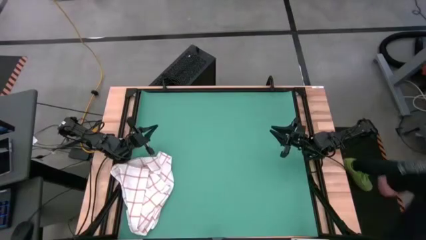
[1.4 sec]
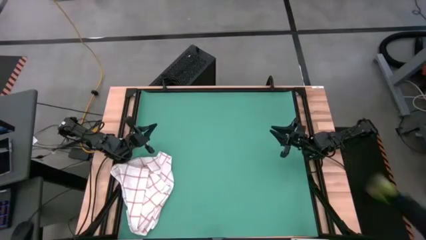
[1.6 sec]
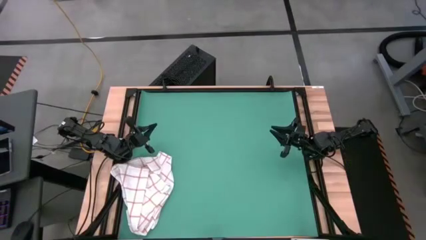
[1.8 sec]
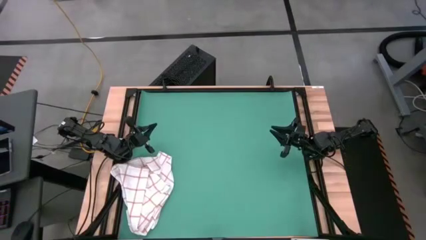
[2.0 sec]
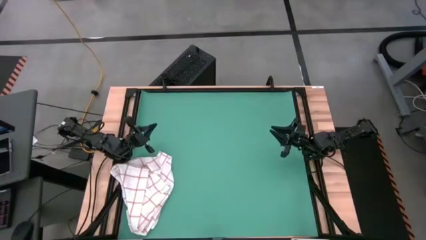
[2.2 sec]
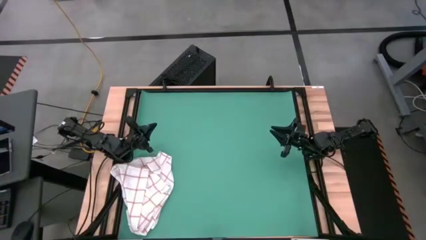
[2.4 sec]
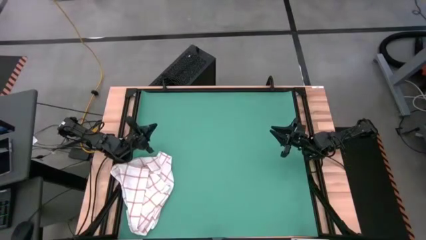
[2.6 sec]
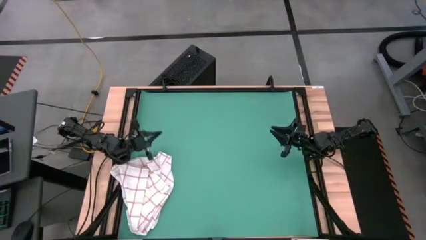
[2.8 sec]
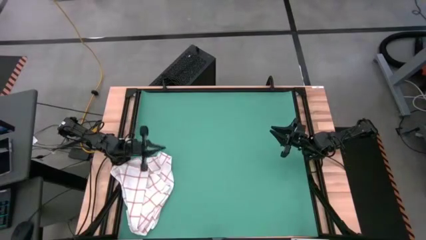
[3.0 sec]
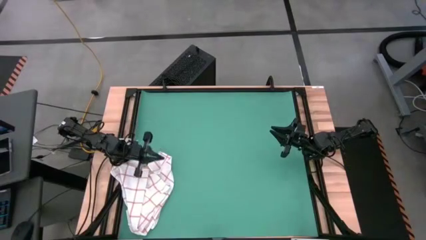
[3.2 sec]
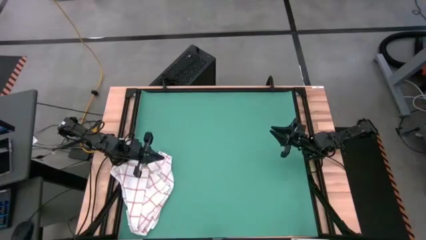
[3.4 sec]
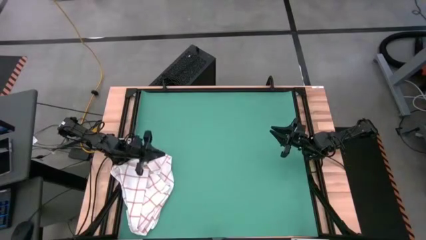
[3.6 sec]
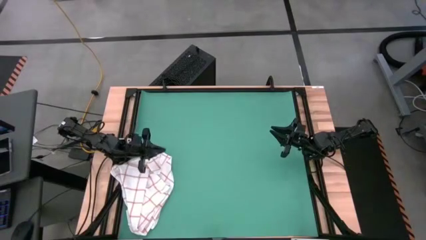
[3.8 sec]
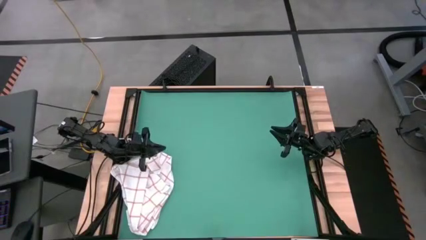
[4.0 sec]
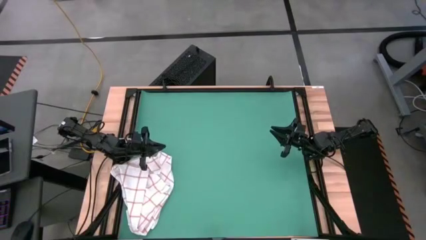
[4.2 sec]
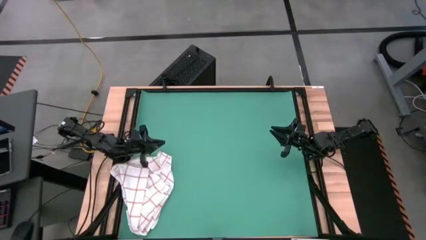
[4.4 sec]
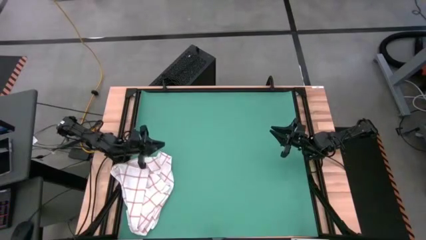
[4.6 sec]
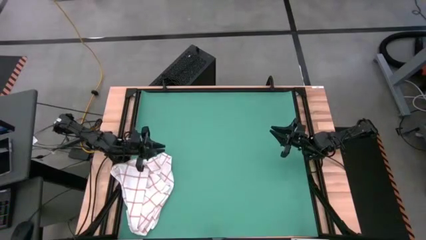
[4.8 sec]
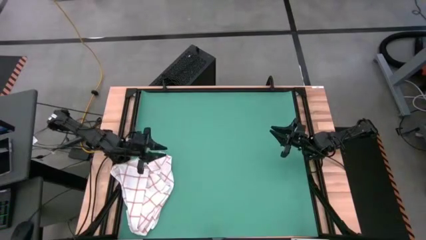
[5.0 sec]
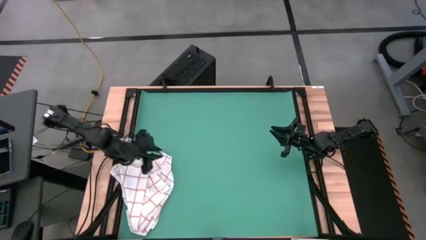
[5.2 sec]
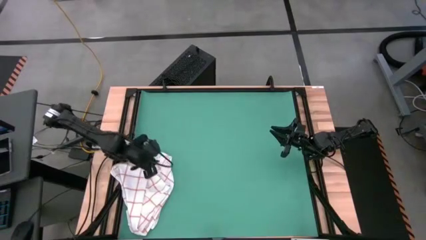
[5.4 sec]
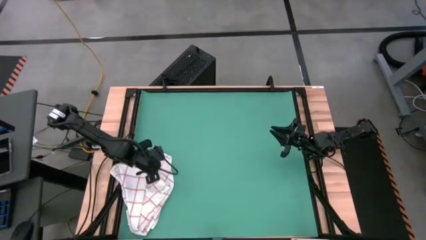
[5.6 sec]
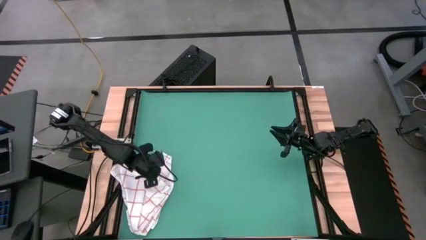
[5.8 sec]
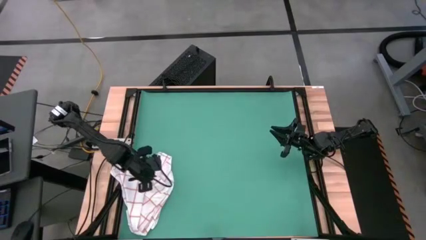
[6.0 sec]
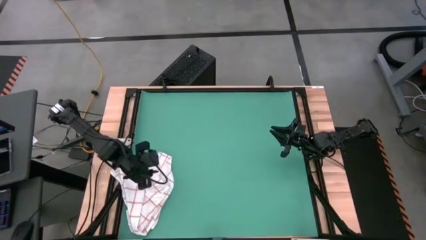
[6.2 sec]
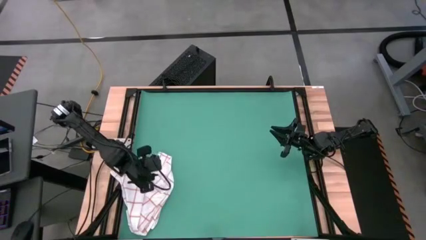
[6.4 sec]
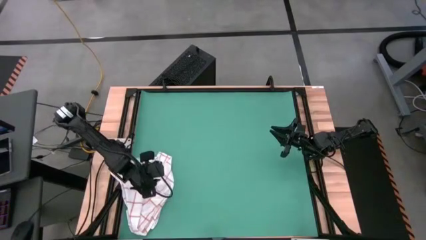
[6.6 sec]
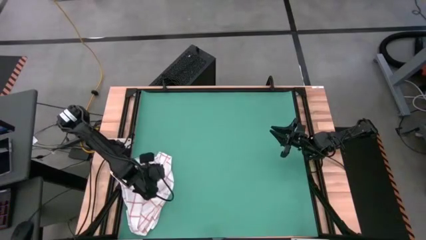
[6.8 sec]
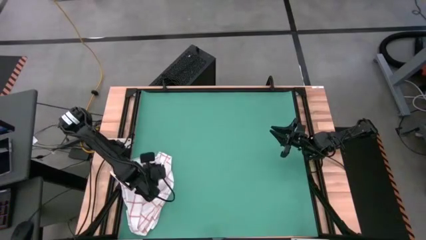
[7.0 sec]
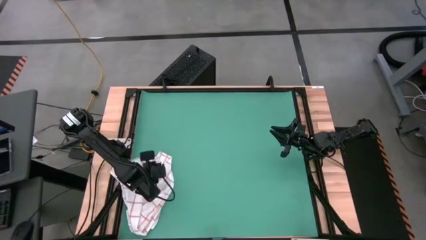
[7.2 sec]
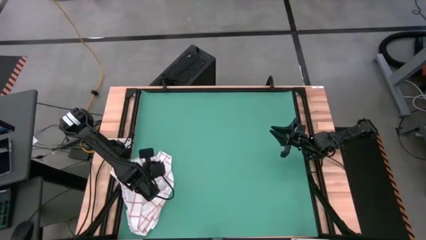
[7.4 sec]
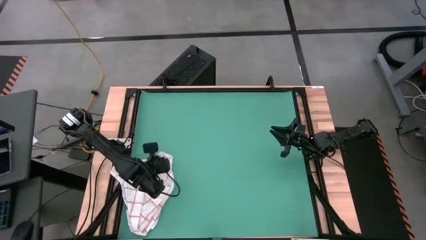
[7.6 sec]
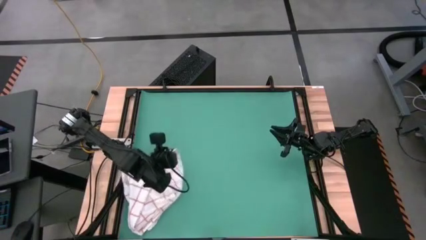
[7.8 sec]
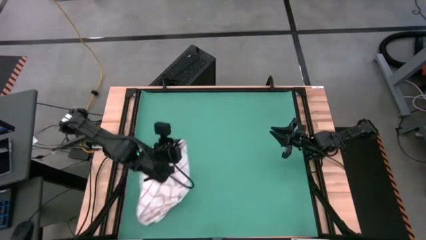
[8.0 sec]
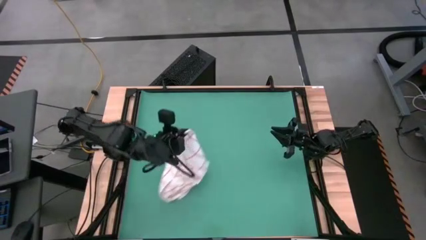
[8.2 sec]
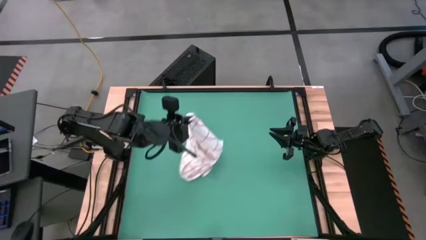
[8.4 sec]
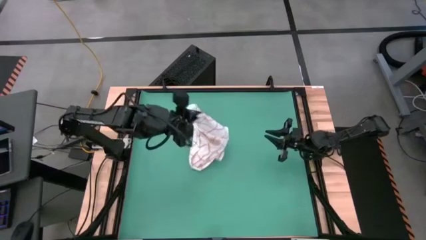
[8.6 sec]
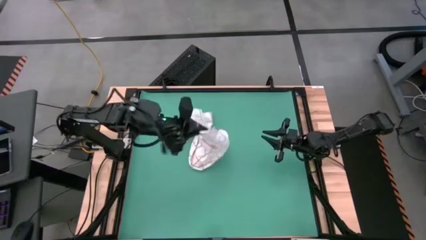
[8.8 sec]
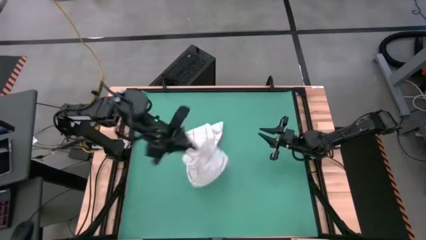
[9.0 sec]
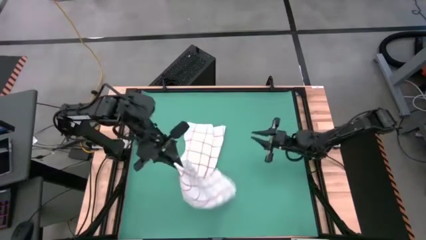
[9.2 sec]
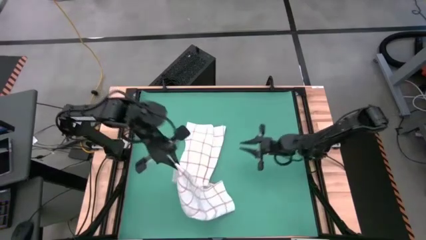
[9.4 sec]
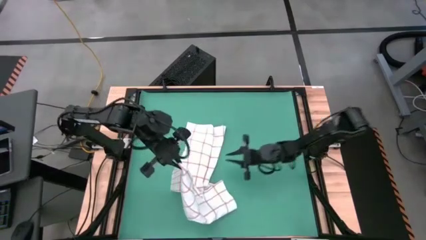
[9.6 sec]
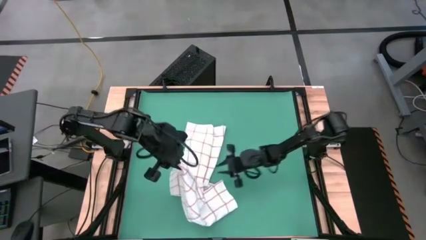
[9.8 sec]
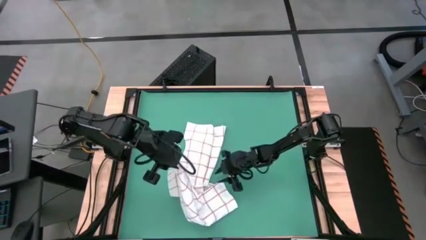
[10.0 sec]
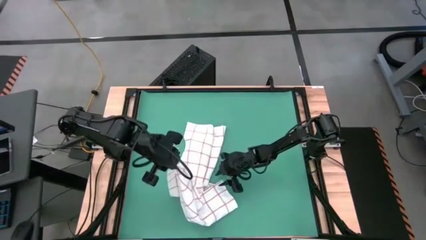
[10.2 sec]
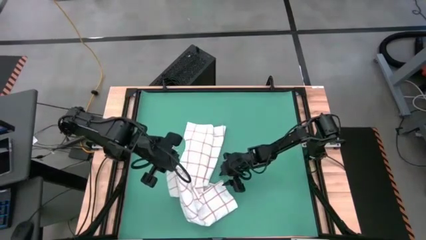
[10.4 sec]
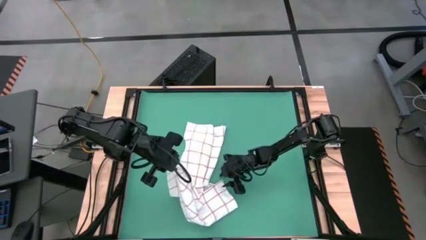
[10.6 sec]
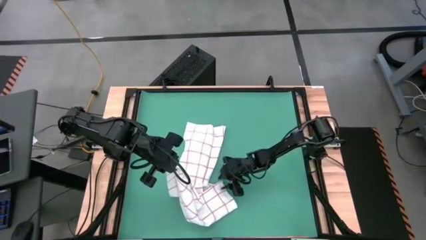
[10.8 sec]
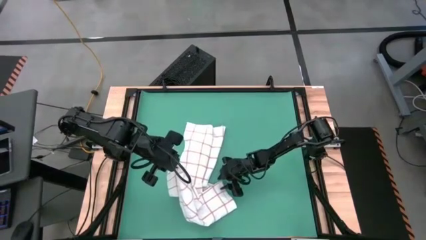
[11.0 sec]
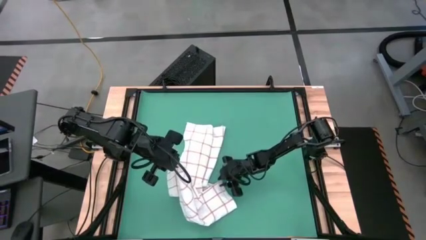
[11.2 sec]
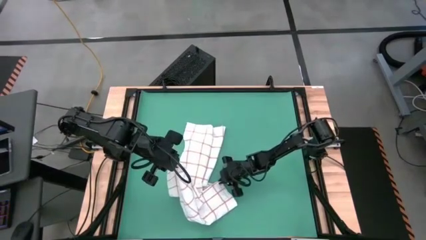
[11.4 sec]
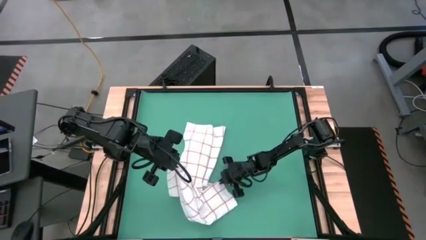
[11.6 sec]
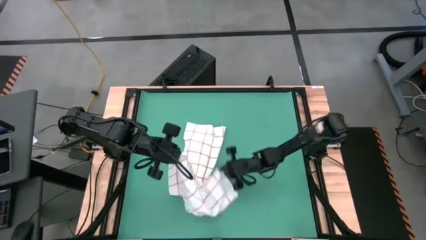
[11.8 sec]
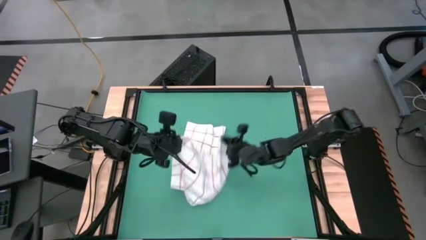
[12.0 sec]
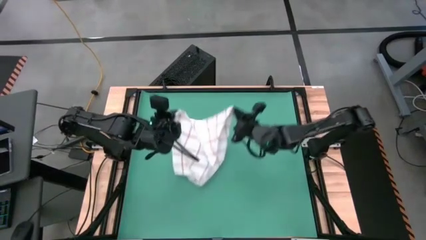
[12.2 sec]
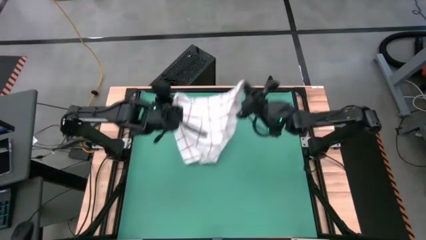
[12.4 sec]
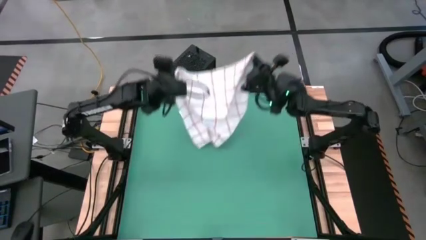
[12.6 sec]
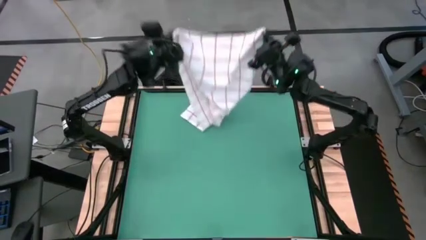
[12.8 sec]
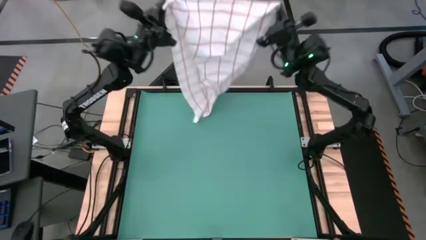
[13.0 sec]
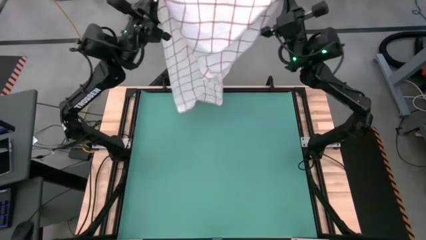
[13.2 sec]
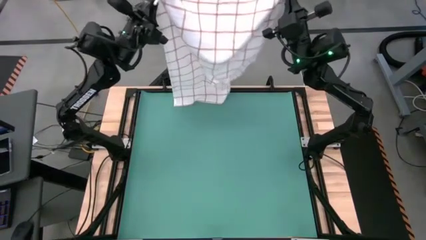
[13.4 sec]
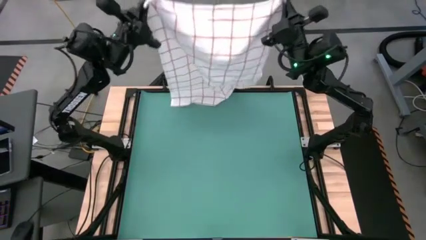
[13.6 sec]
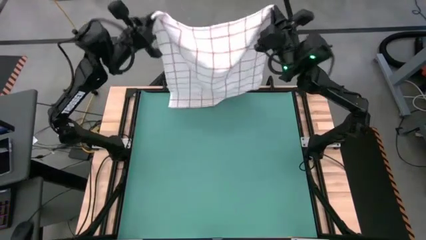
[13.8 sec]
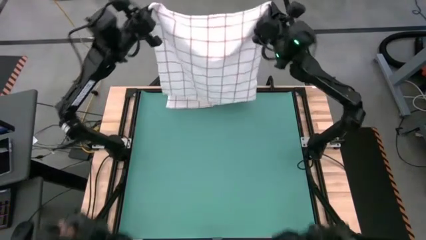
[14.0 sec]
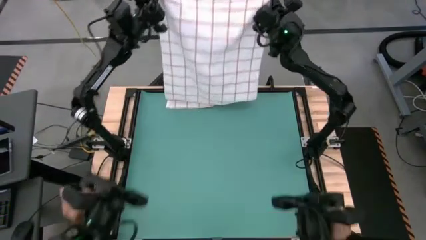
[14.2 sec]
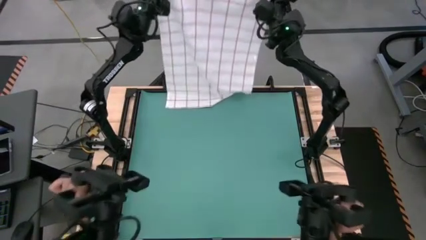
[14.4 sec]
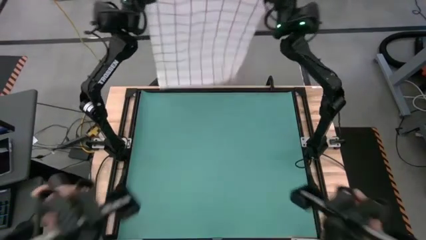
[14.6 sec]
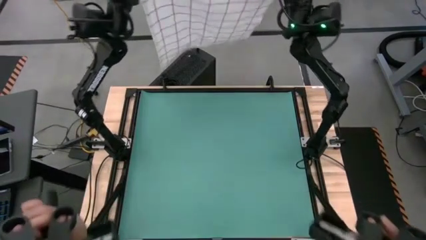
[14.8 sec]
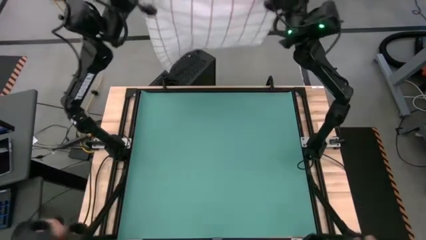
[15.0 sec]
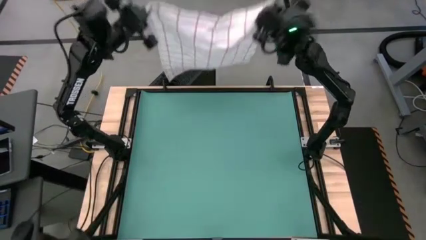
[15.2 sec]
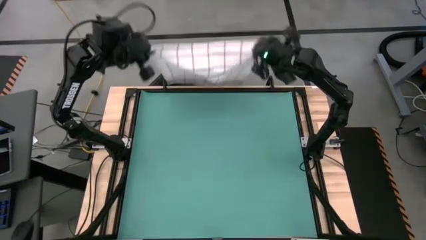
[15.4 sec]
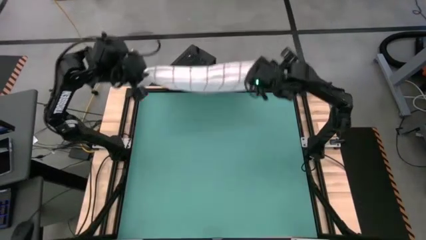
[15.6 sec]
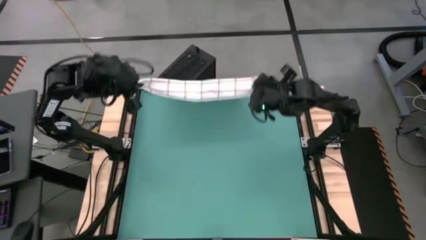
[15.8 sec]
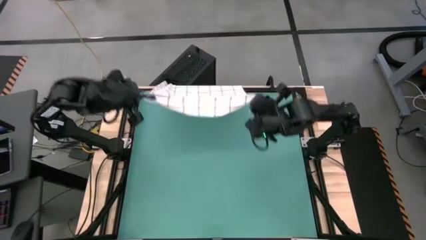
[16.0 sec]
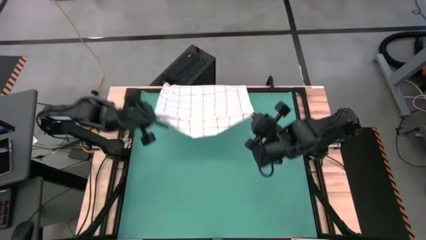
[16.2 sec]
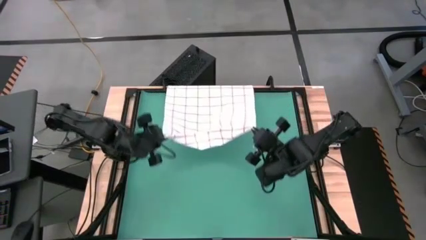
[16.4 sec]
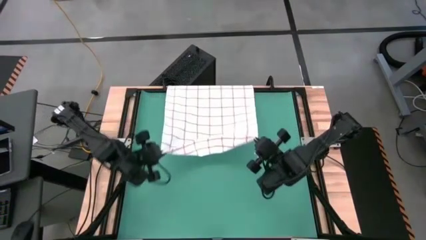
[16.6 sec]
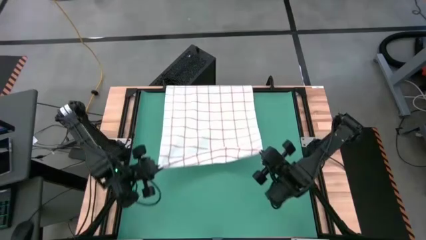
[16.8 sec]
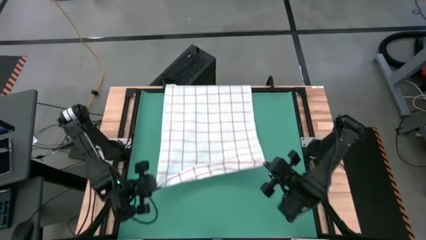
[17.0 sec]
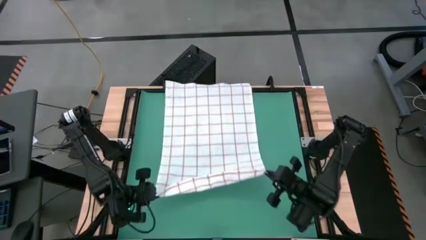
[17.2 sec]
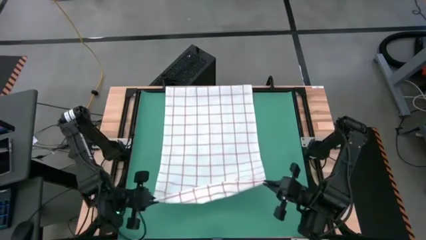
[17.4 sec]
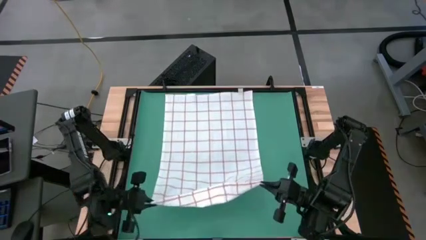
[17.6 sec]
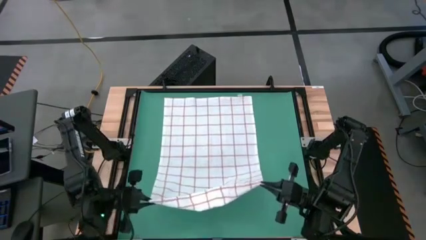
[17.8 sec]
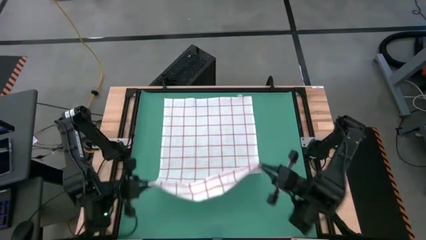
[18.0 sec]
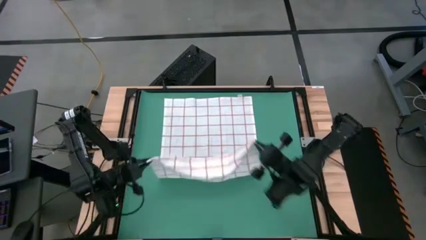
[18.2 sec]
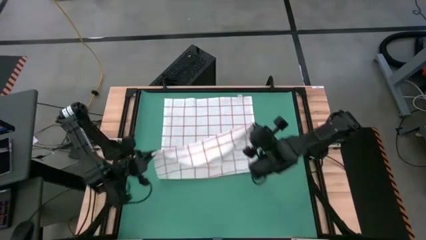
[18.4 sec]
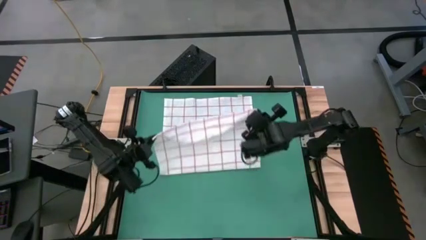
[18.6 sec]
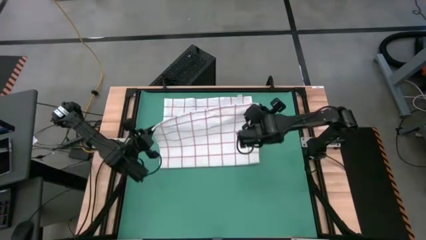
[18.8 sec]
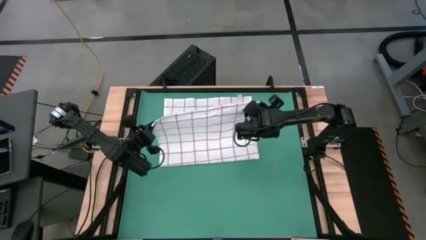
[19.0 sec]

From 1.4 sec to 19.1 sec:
Task: Roll towel
Fold the white towel
